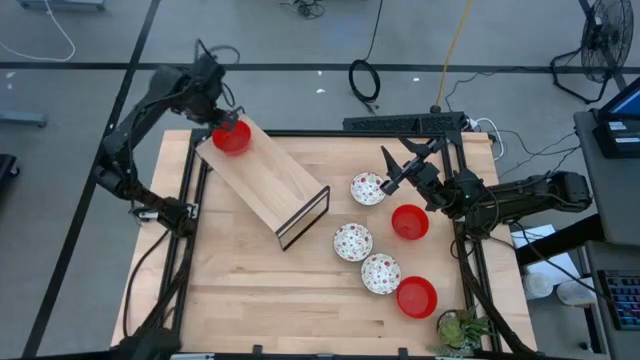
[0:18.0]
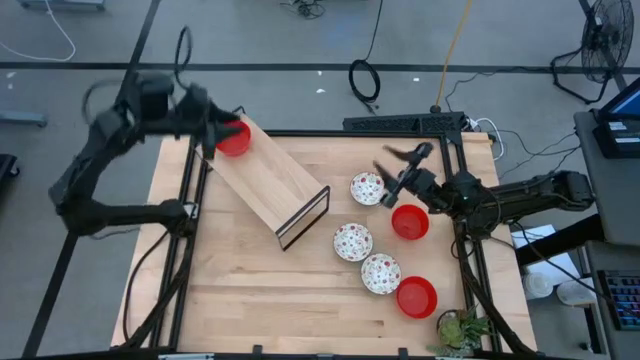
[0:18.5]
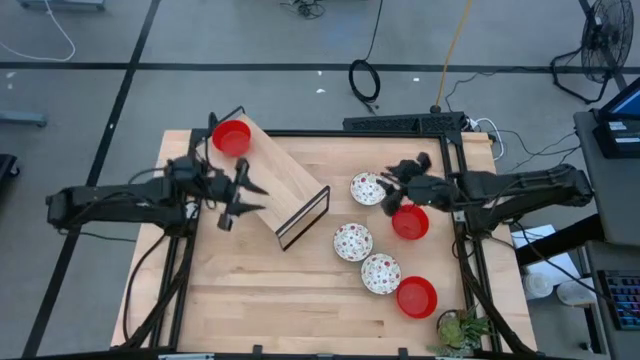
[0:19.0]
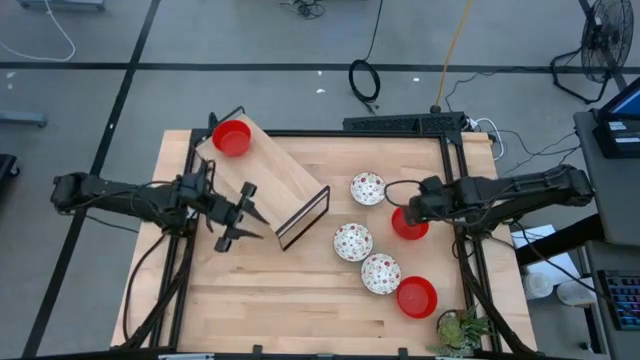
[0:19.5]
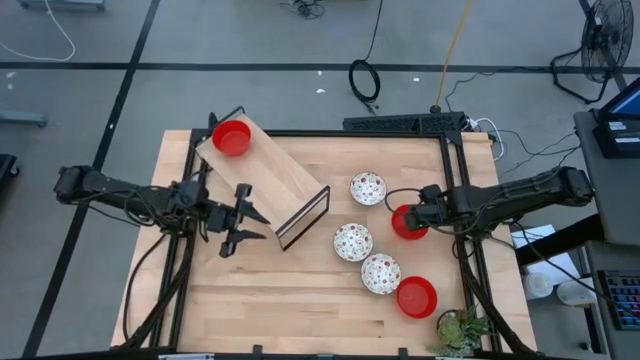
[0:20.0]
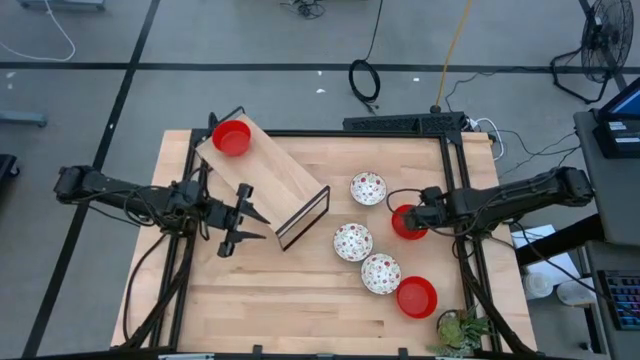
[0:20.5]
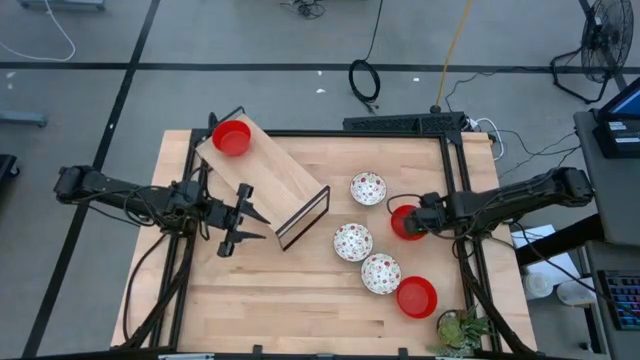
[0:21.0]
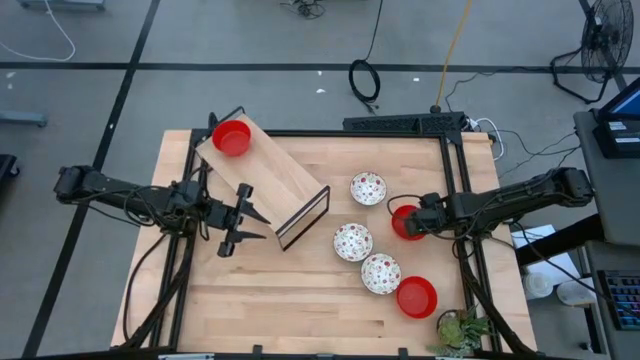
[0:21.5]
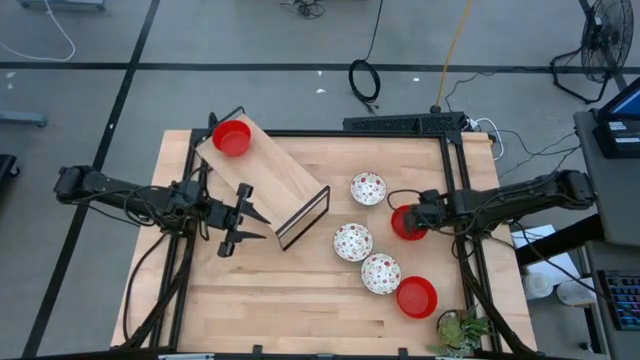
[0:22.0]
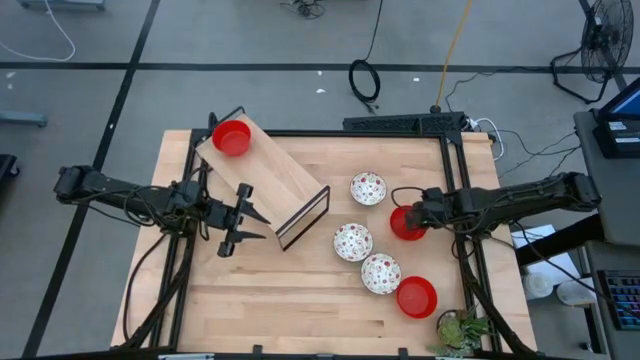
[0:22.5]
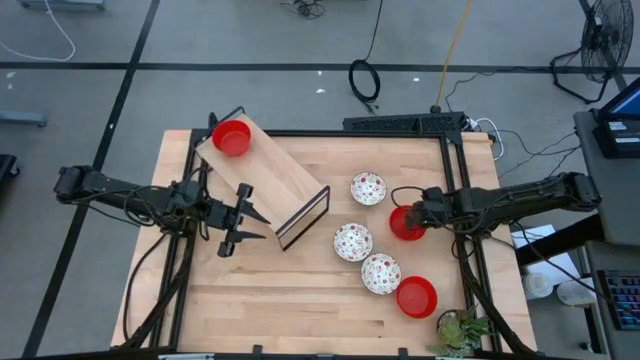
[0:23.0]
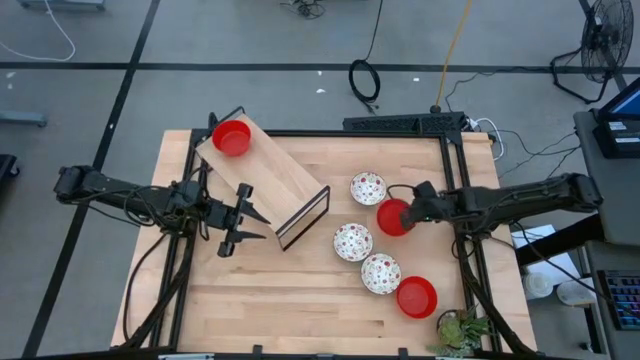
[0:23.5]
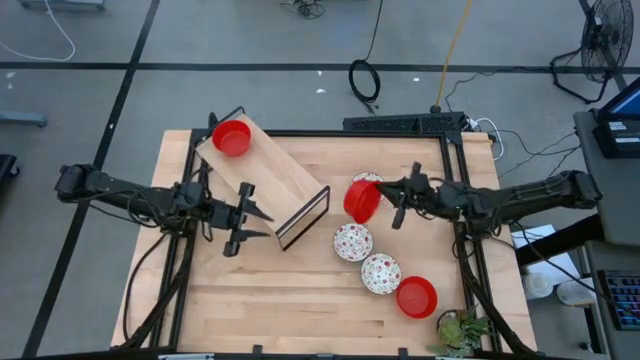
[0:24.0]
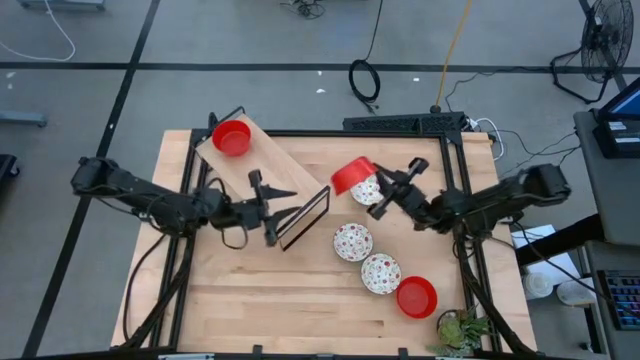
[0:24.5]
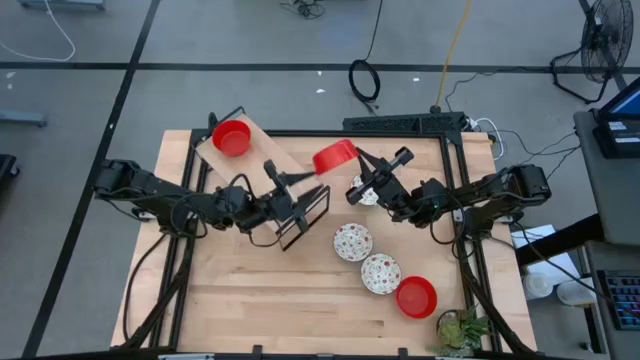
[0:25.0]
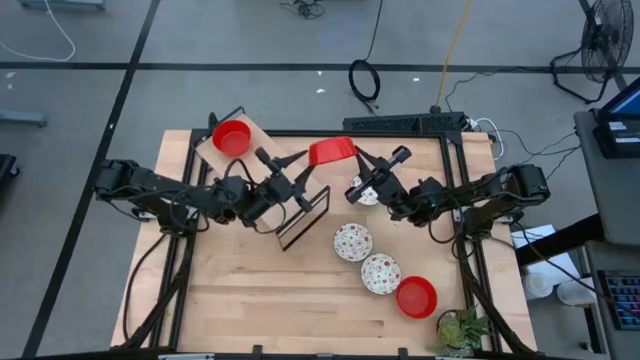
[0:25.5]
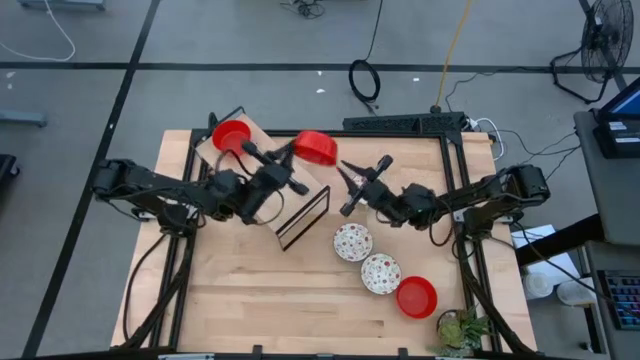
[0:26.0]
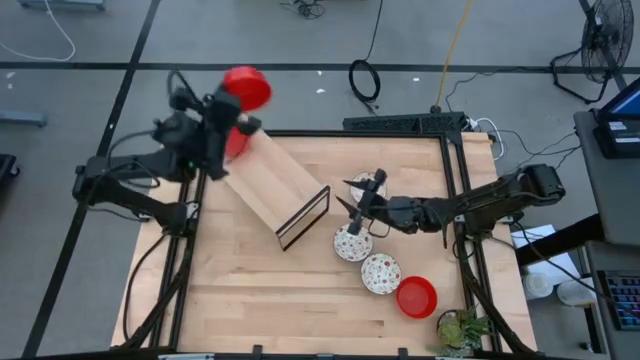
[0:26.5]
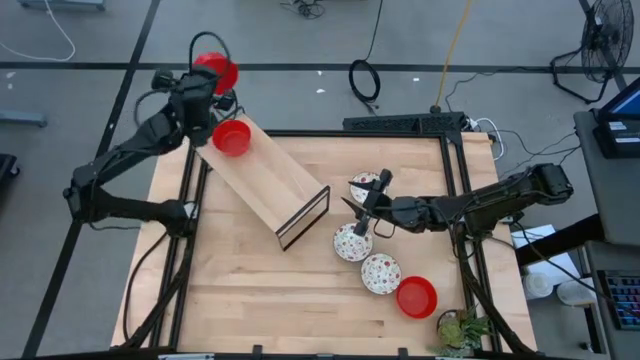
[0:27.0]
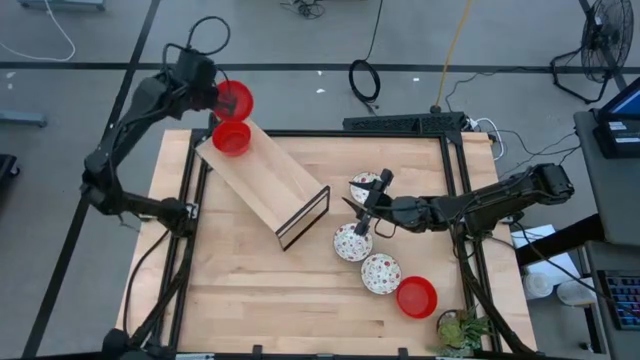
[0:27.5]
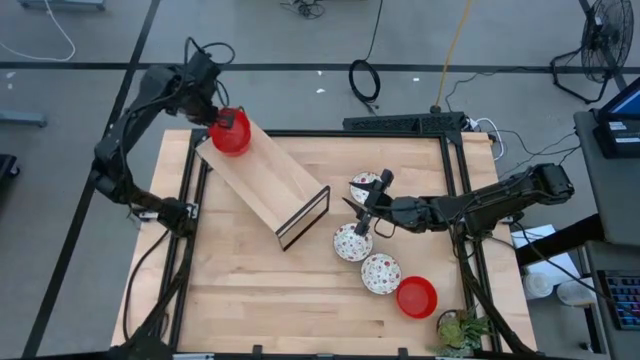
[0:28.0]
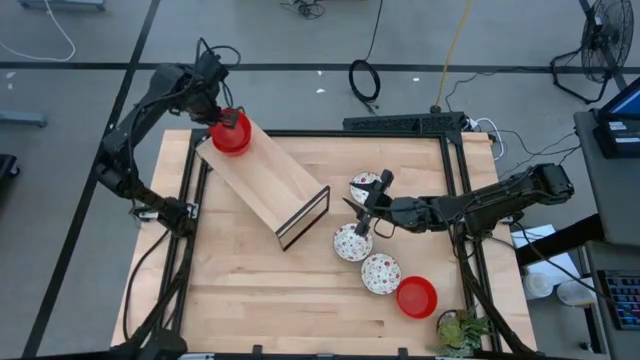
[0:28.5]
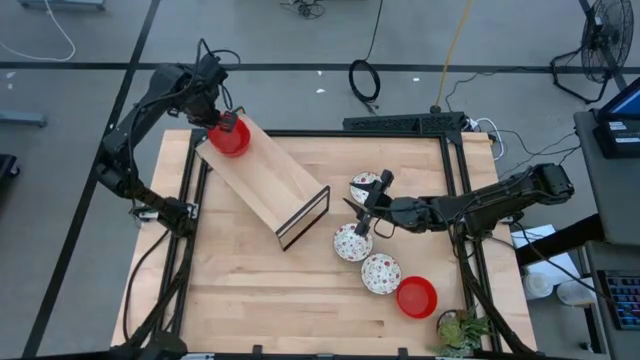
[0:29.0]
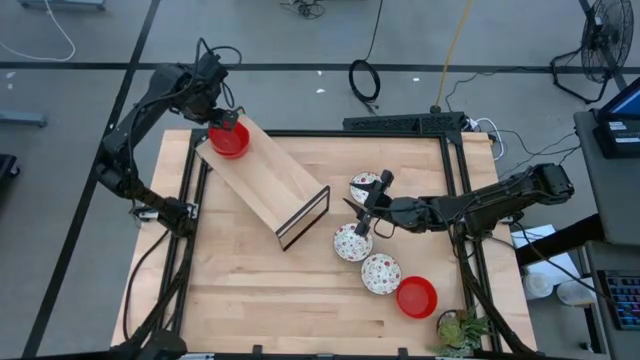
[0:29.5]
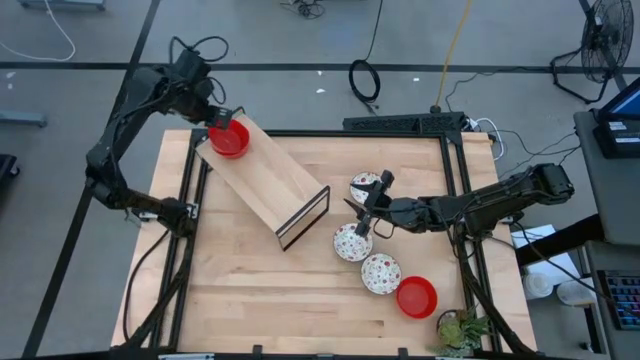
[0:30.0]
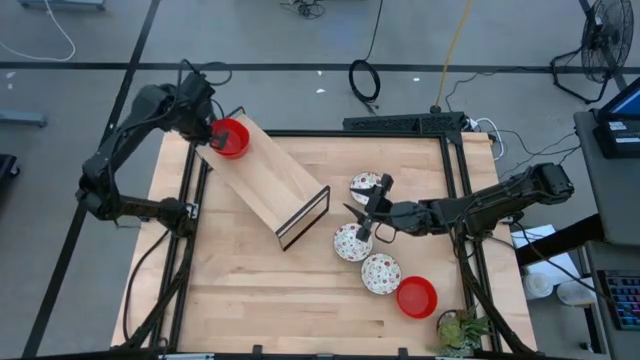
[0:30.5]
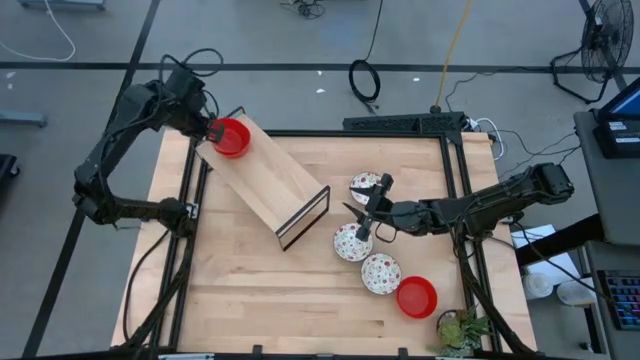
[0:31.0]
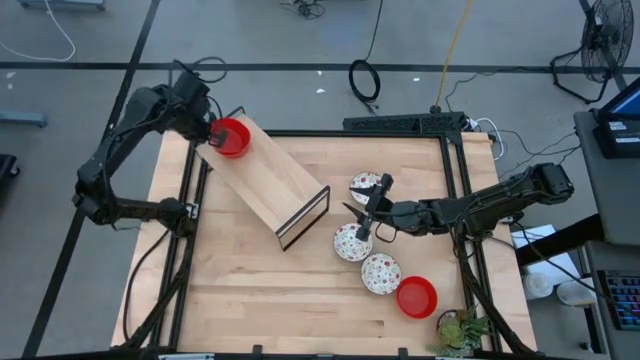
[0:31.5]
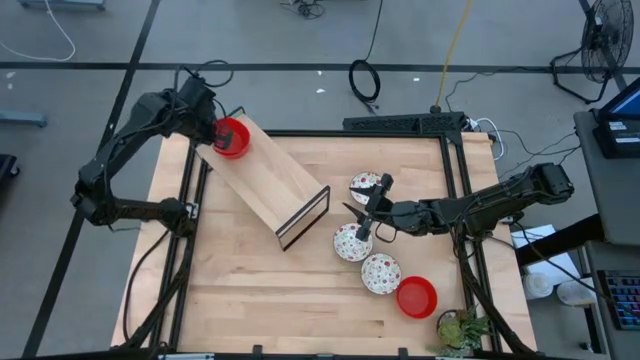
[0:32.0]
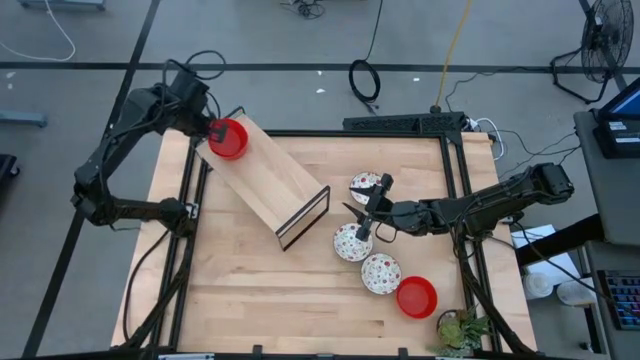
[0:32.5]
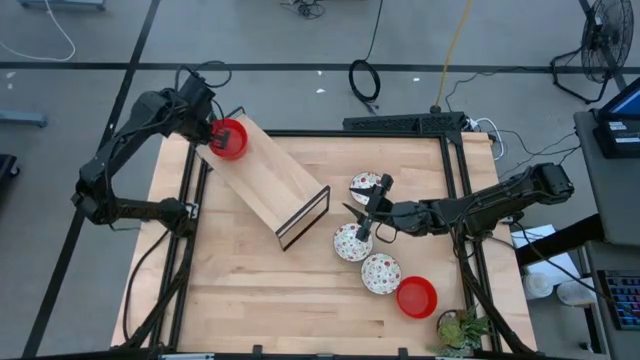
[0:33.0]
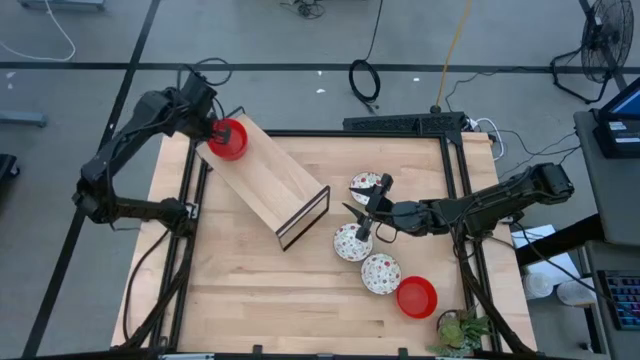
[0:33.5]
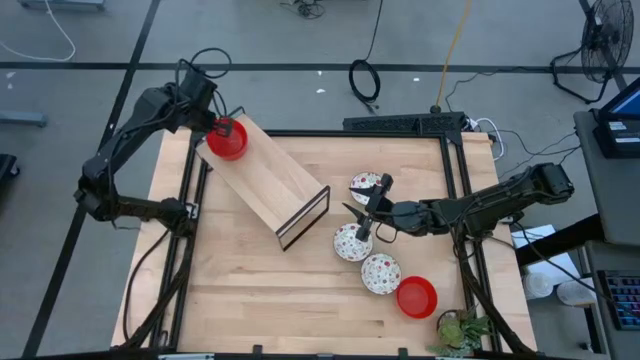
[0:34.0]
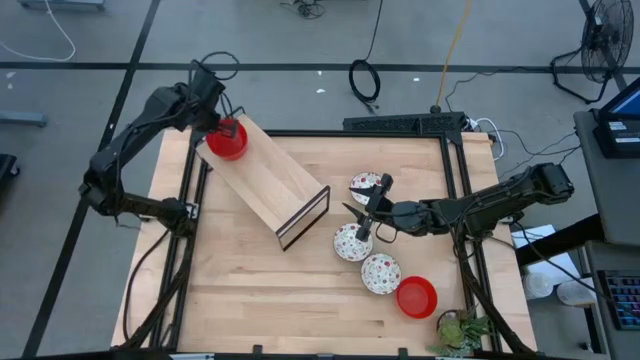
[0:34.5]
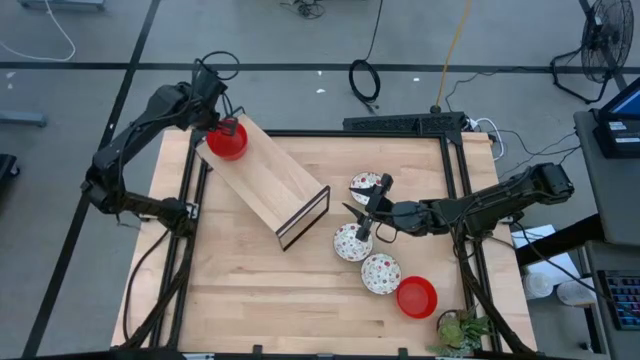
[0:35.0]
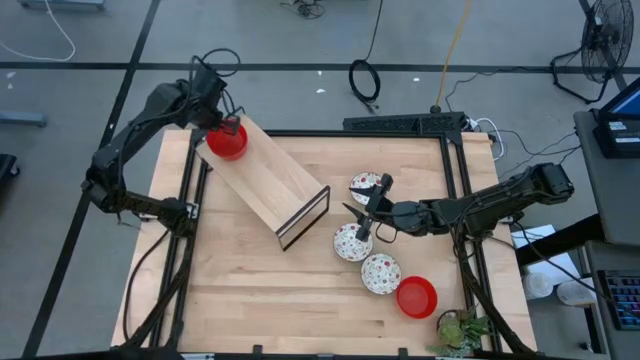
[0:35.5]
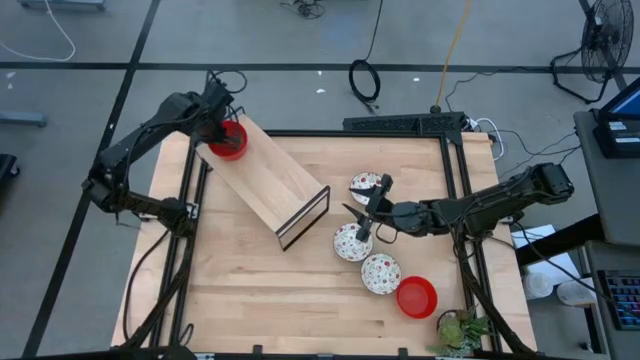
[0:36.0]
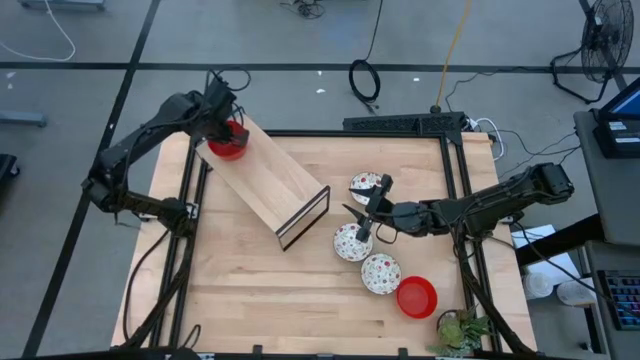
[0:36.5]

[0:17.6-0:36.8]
Task: Pick & Place Mini bowls
Stack the top red bowl on the red bowl on the shelf

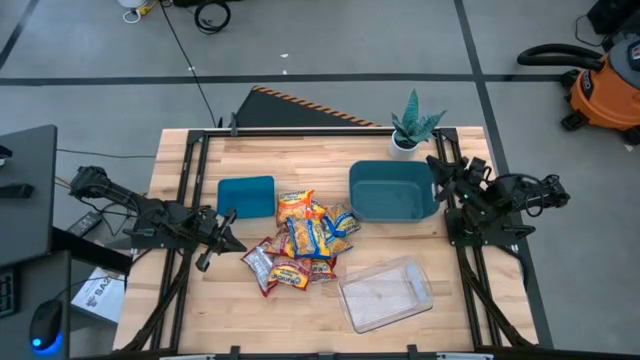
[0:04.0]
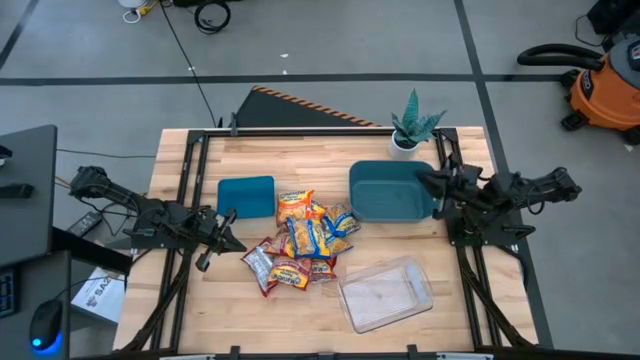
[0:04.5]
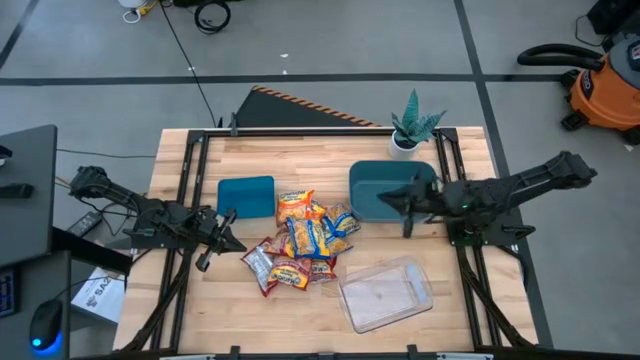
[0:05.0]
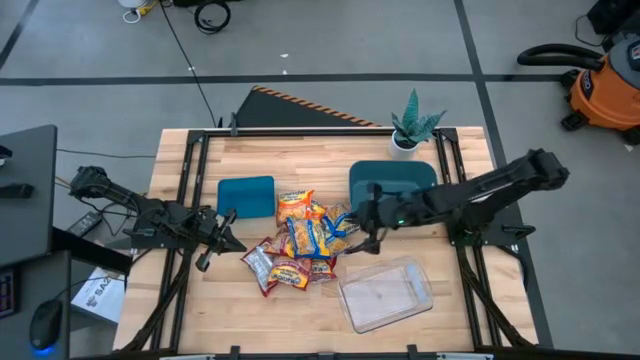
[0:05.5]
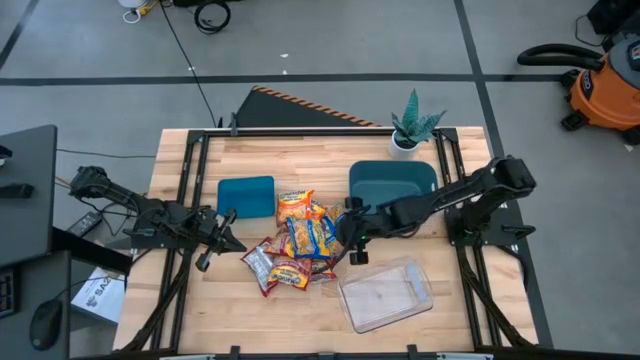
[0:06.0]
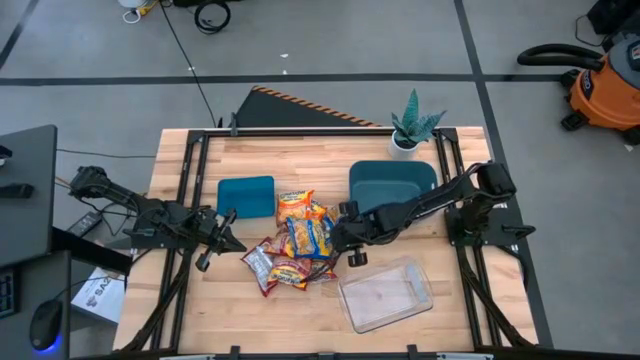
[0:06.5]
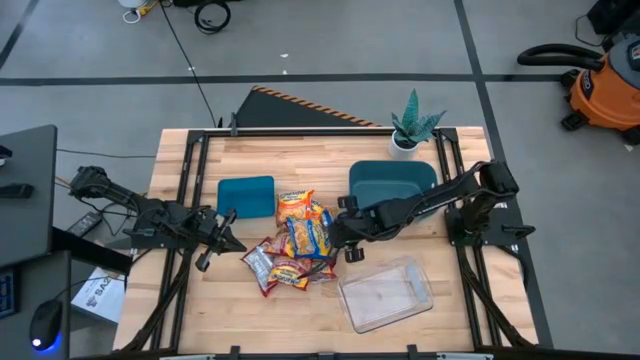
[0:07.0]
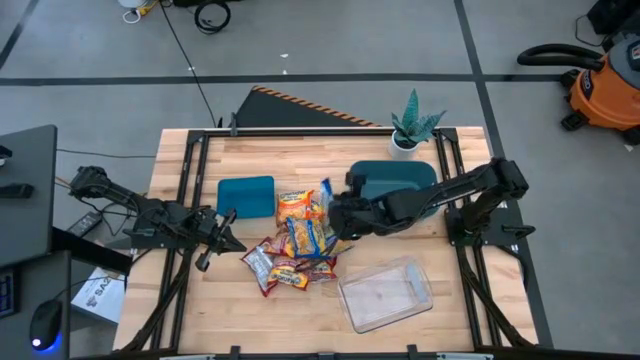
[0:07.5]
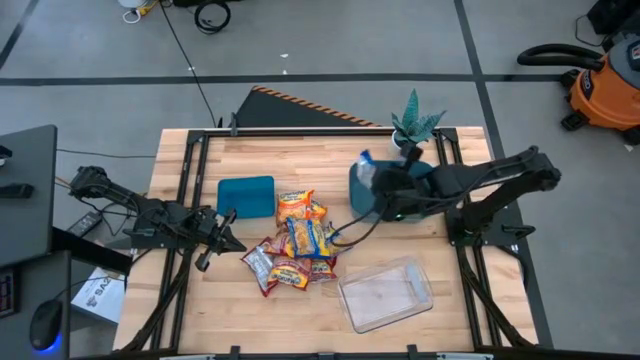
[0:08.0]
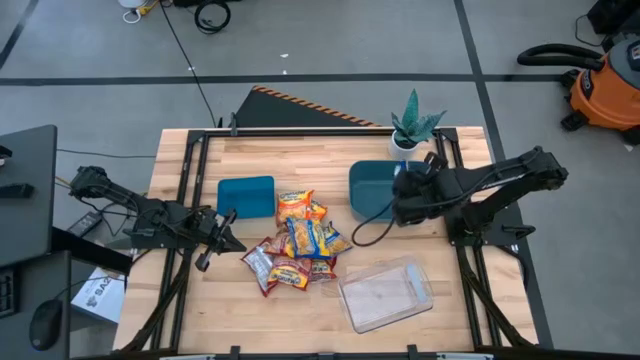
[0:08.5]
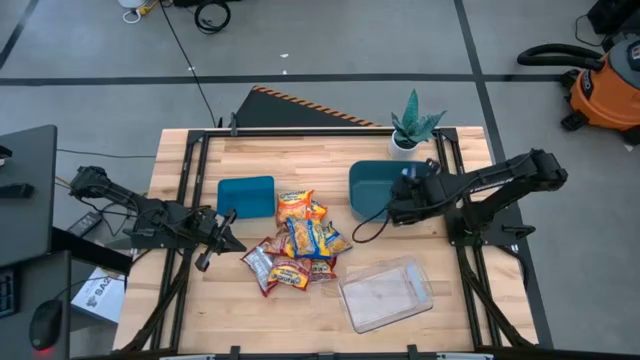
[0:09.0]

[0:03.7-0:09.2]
Task: Sort Maruchan noodles
Put the blue noodle pack into the green bin
